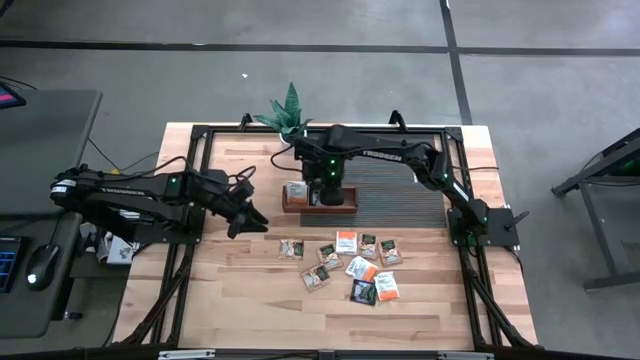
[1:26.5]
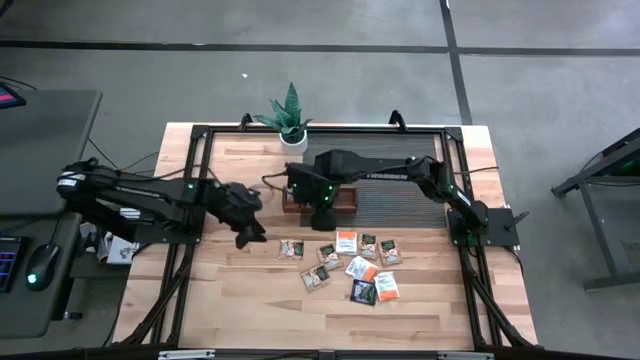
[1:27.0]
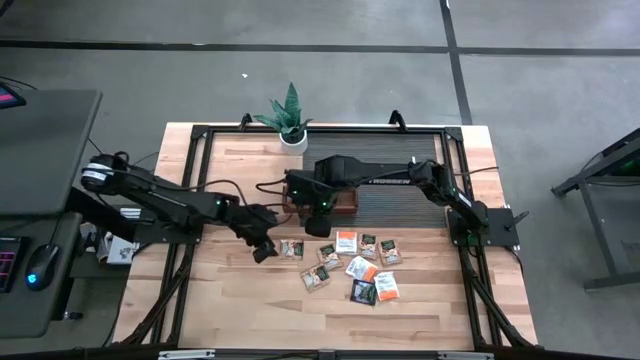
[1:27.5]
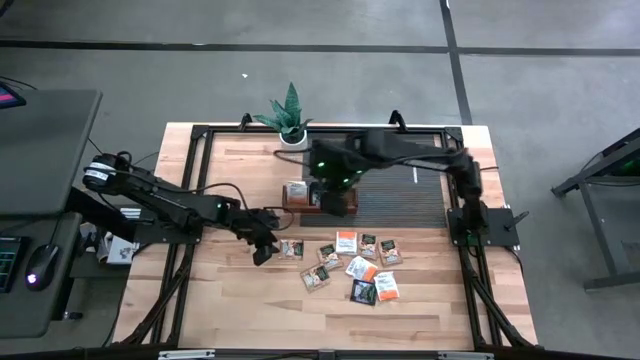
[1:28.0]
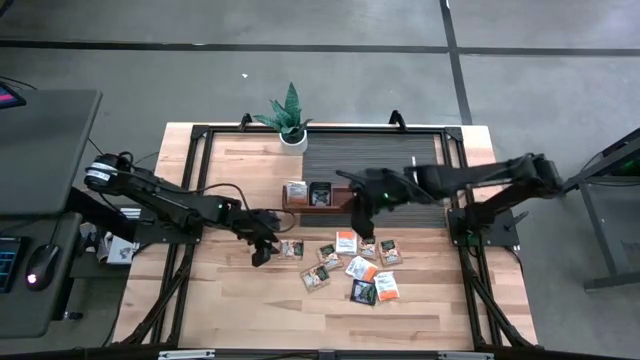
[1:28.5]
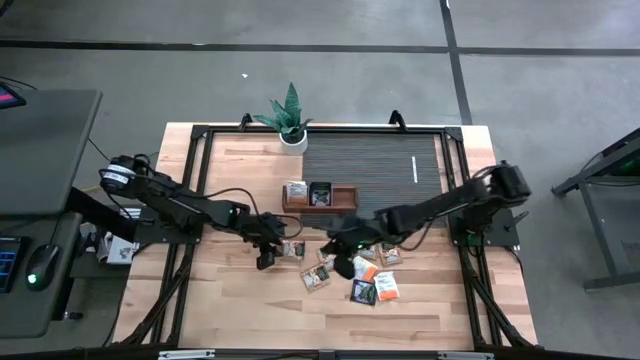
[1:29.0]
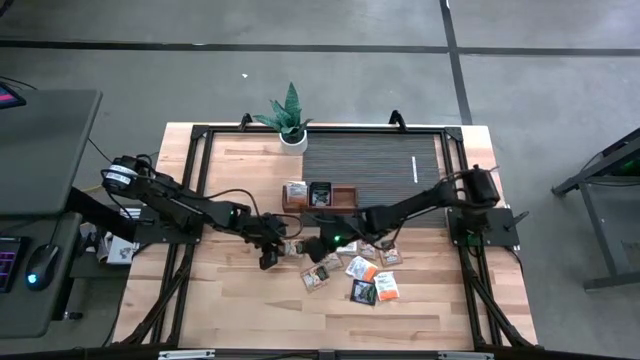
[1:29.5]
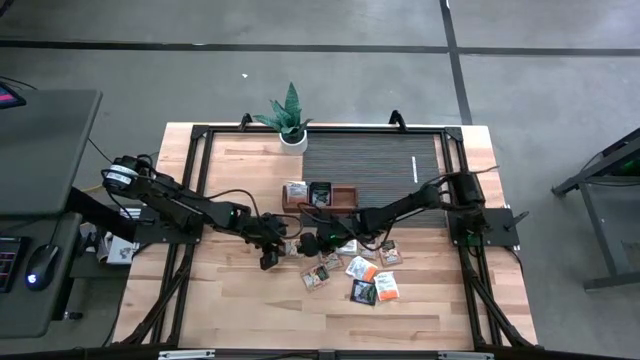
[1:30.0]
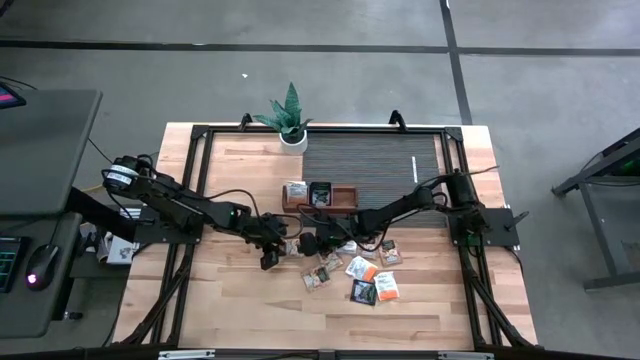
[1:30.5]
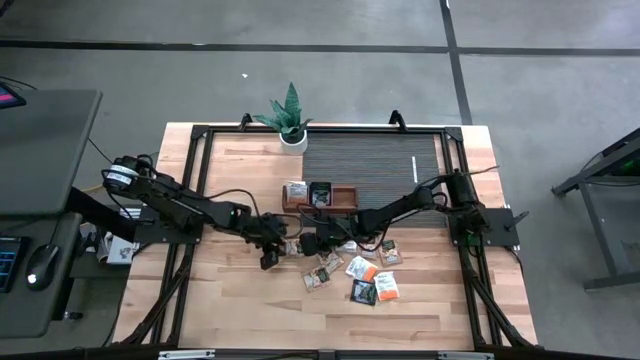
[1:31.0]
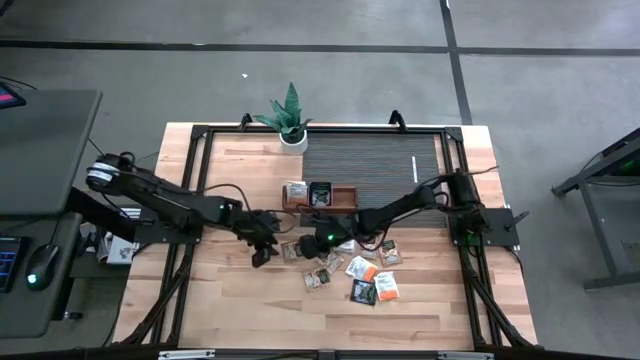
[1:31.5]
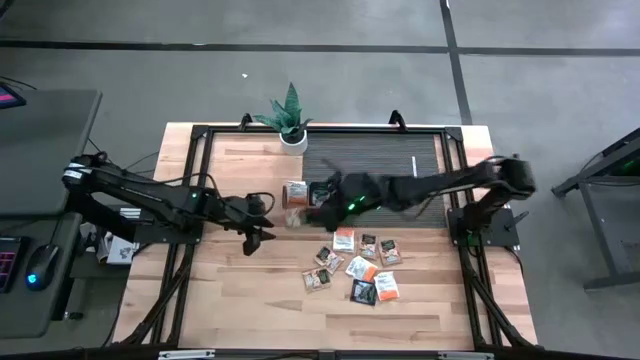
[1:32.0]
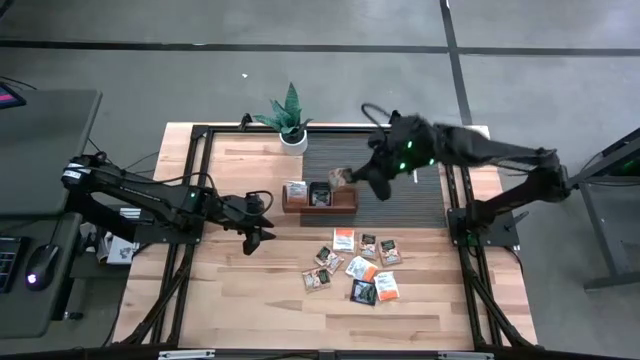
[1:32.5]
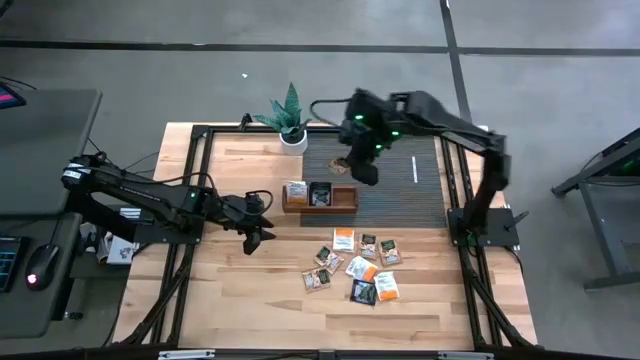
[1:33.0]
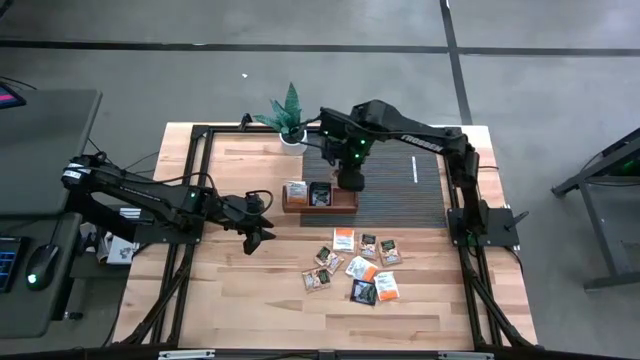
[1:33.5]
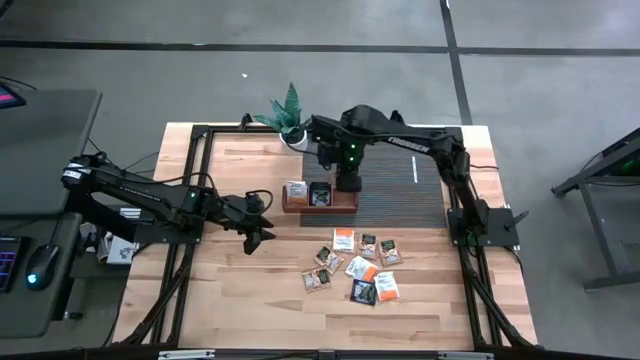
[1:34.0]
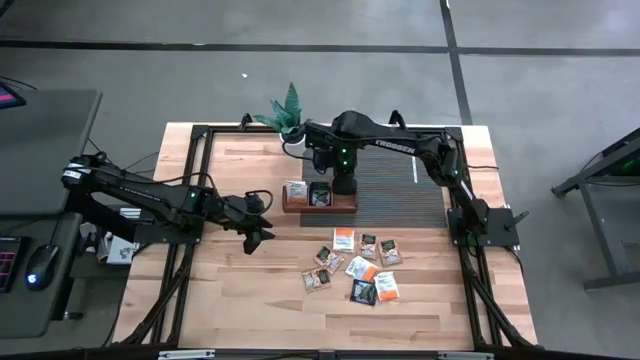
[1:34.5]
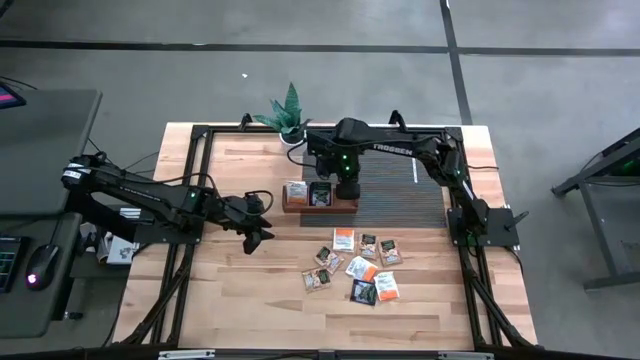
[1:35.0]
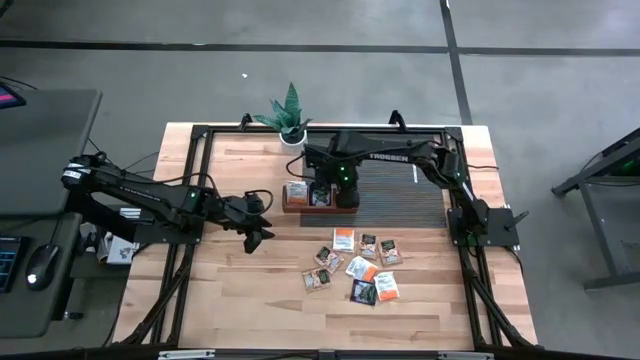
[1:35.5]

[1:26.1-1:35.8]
Task: Pick & Place Tea
Put the brown tea bag into the right section of the wooden organizer

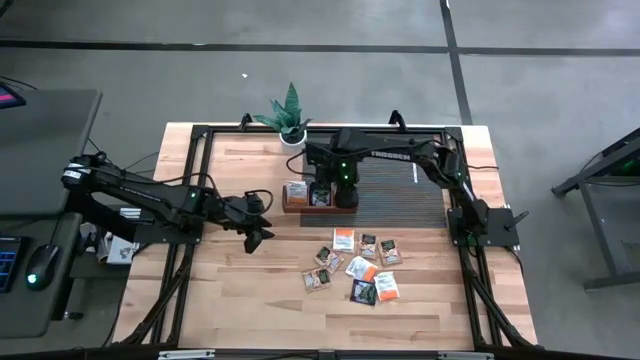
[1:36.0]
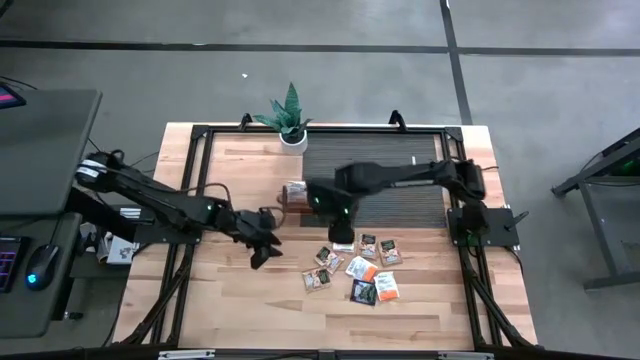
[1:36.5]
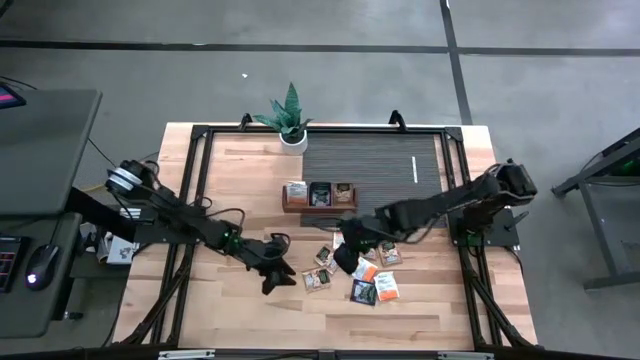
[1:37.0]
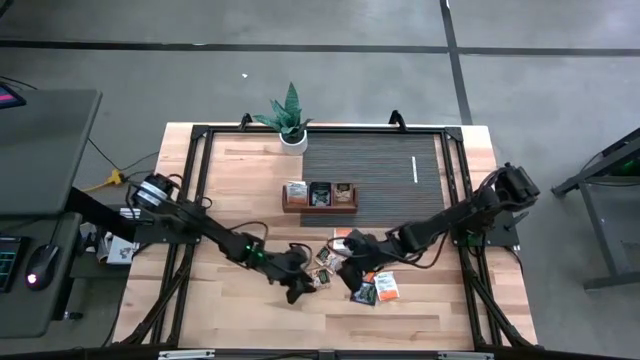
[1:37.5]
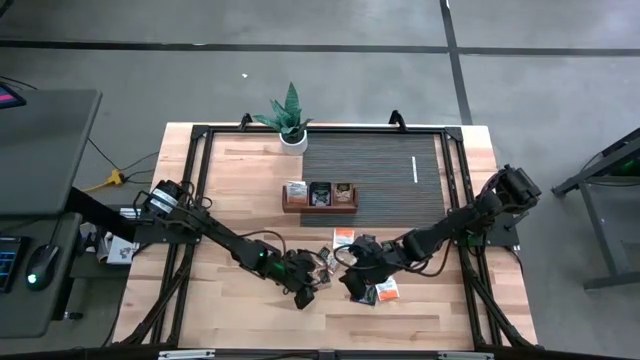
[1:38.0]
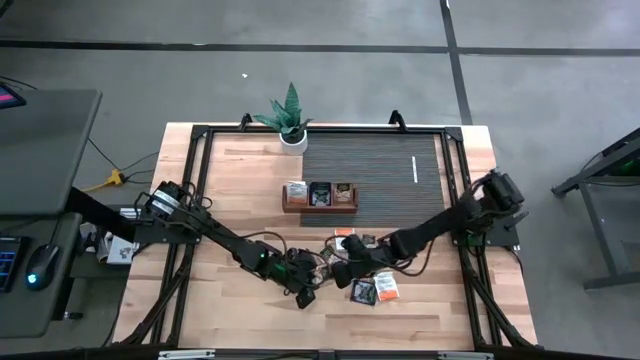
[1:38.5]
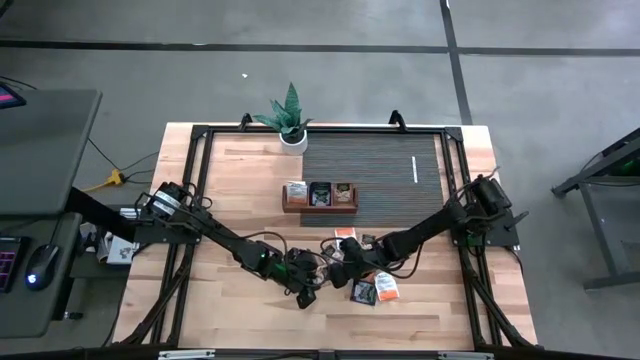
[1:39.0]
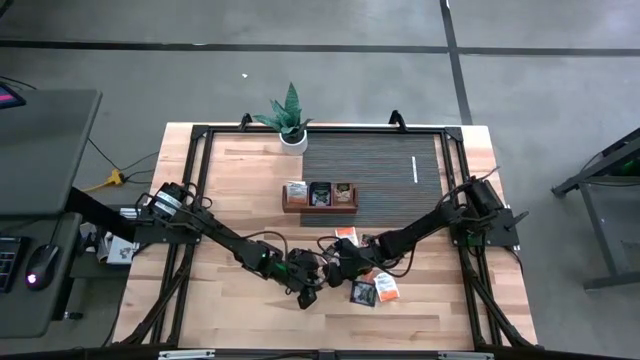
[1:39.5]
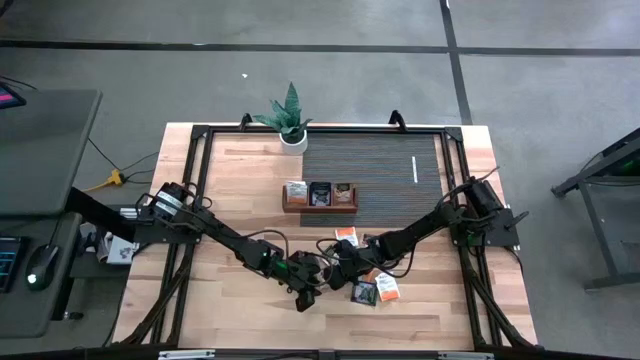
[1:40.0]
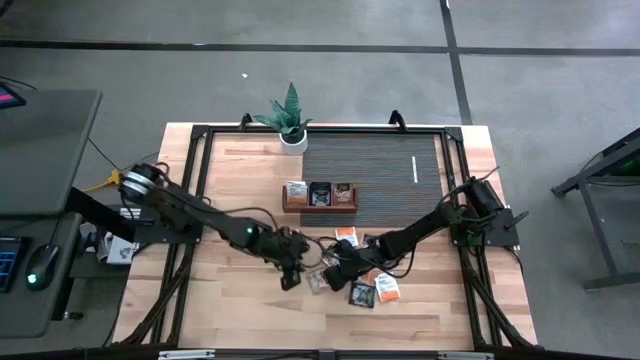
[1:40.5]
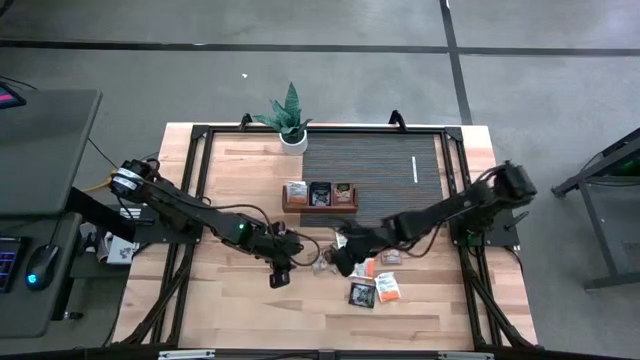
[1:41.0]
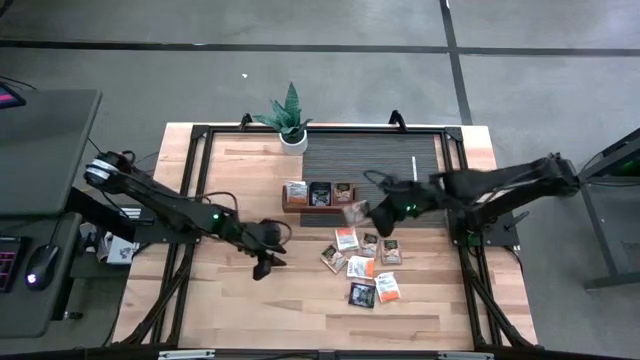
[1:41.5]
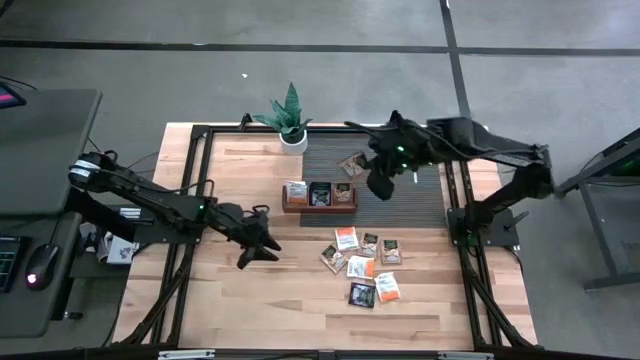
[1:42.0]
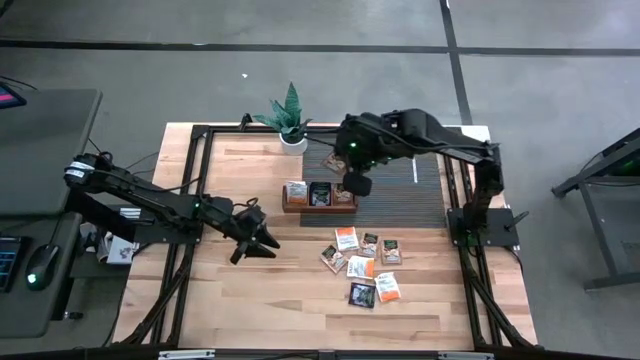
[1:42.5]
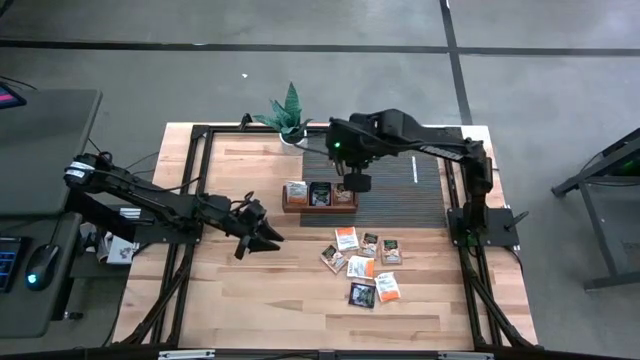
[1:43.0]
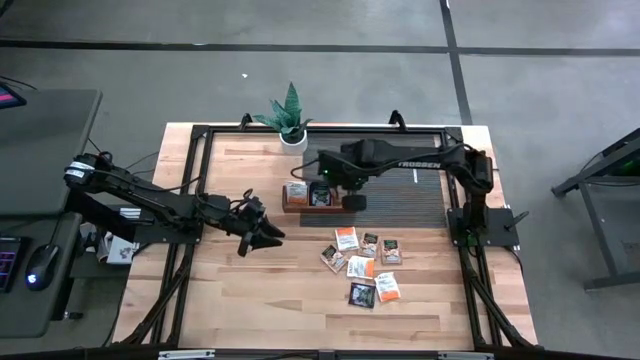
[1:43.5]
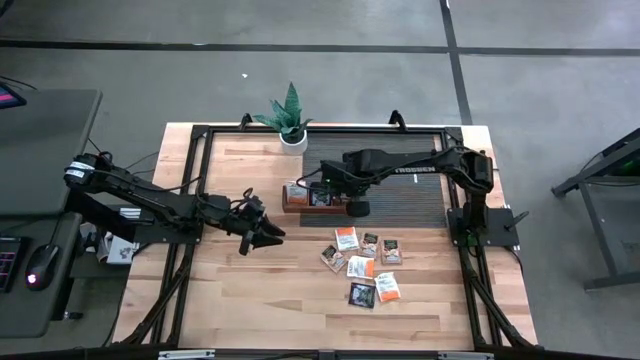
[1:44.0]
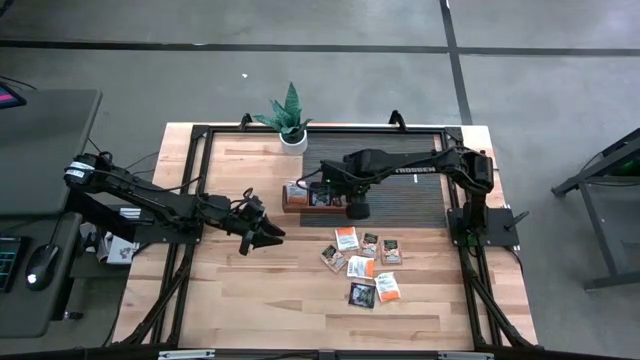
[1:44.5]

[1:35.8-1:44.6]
Put the brown tea bag into the right section of the wooden organizer

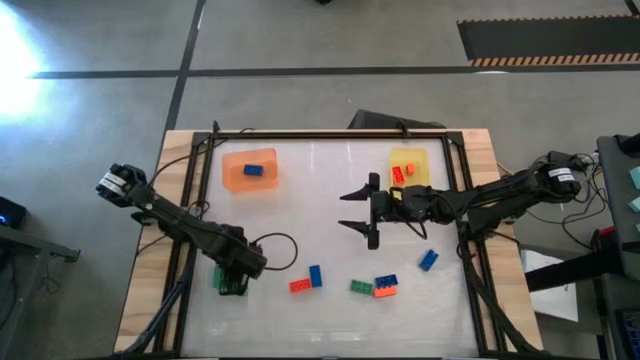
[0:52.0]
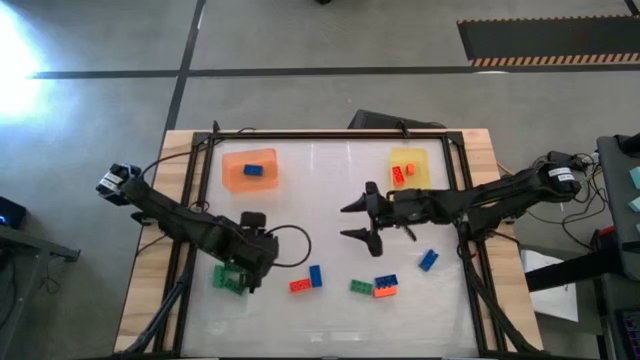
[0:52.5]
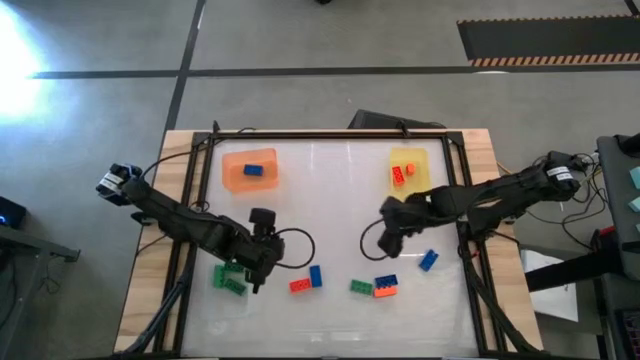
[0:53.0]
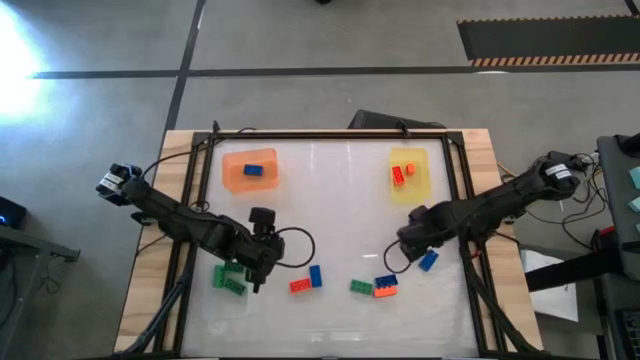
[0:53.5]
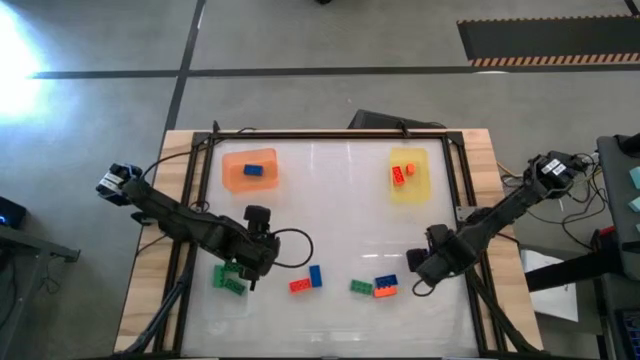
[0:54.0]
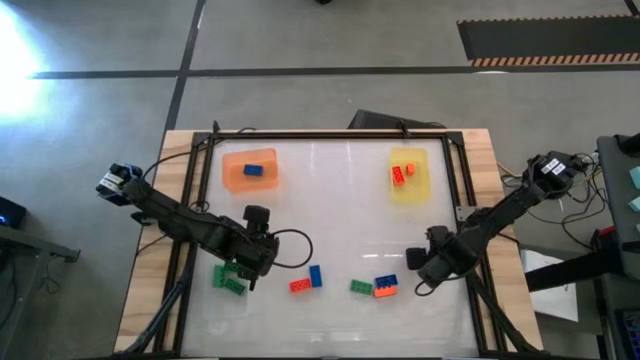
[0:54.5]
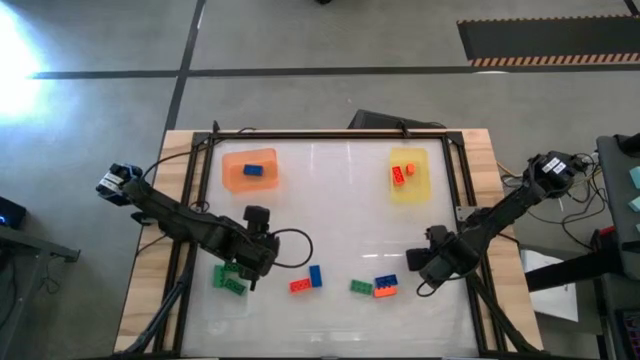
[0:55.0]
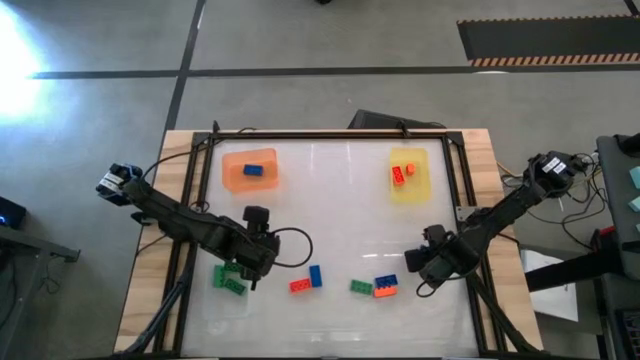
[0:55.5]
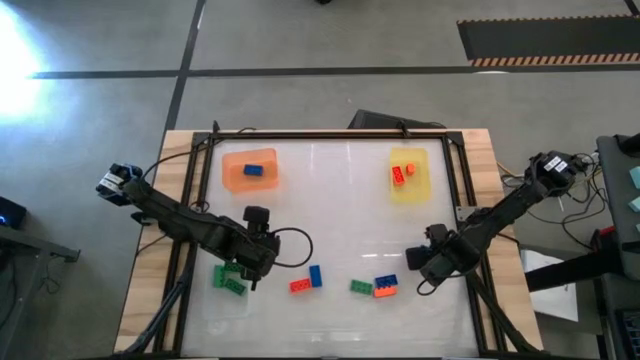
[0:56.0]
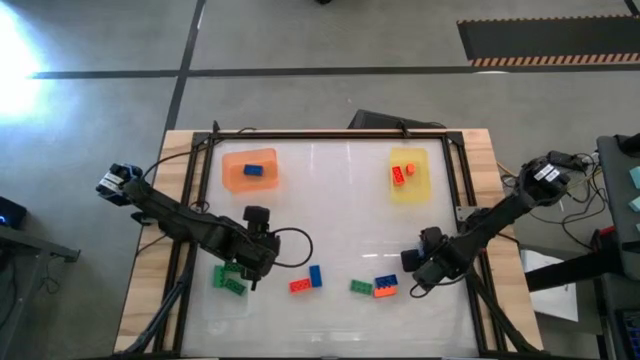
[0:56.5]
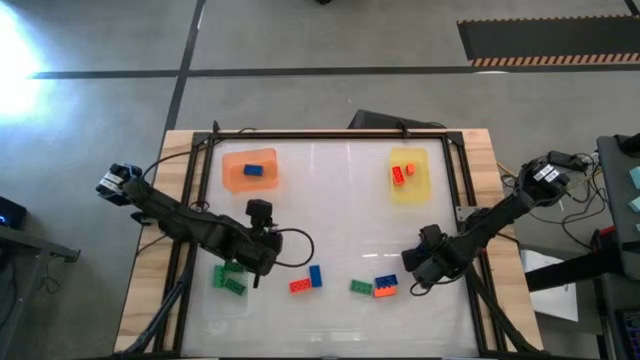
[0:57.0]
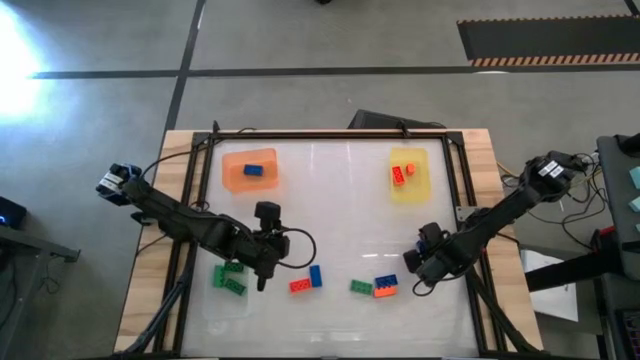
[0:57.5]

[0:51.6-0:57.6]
Task: Sort & place blocks by color
Put the blue game piece into the orange bin
